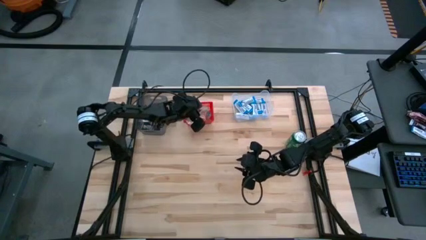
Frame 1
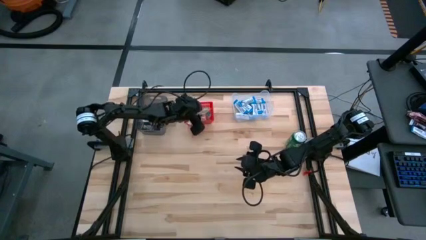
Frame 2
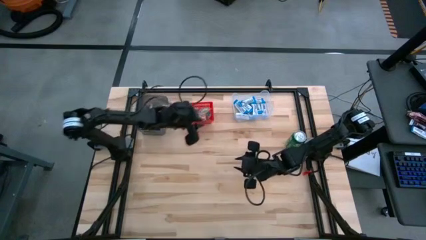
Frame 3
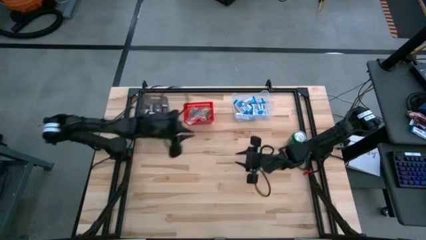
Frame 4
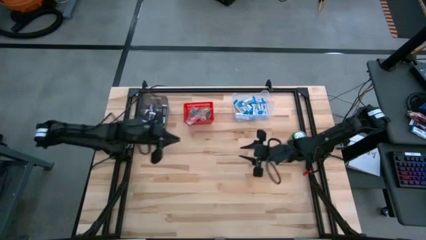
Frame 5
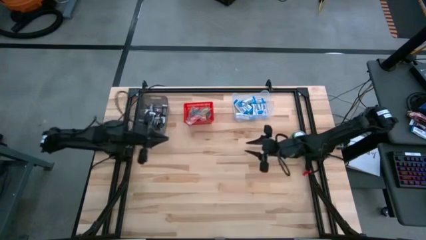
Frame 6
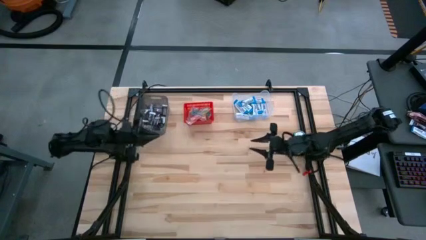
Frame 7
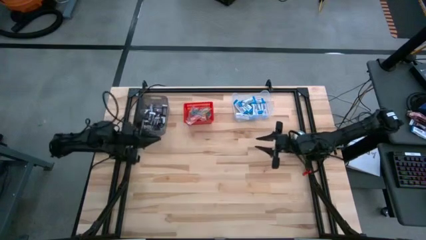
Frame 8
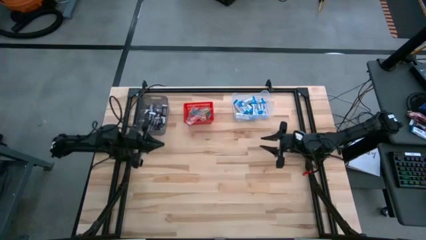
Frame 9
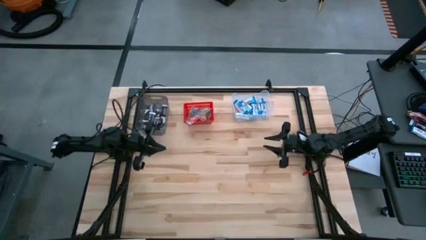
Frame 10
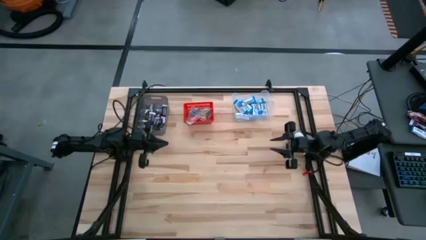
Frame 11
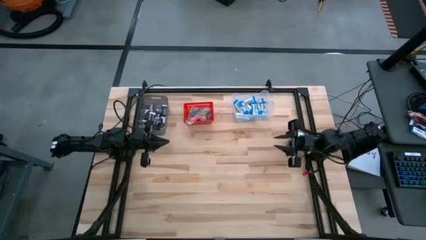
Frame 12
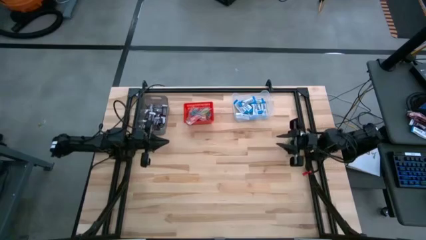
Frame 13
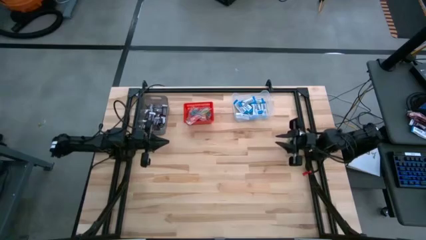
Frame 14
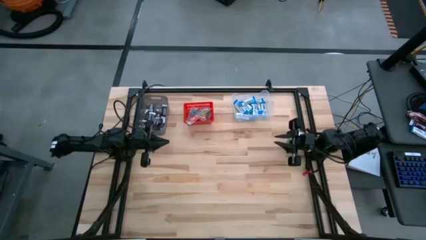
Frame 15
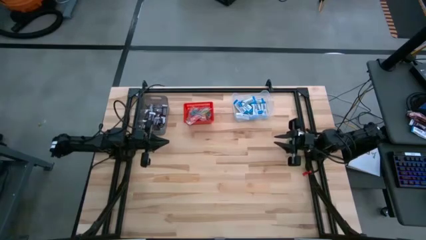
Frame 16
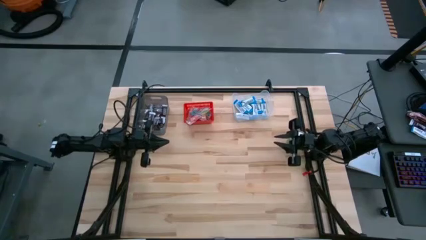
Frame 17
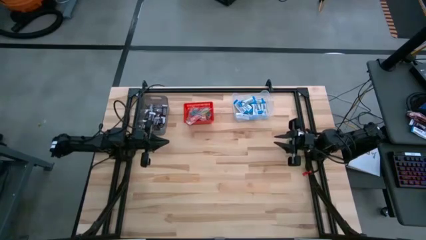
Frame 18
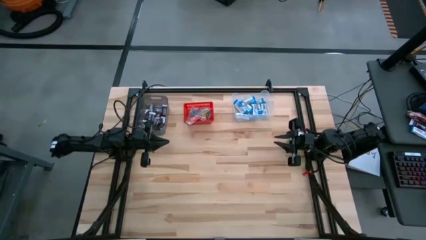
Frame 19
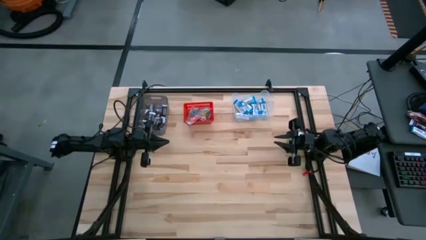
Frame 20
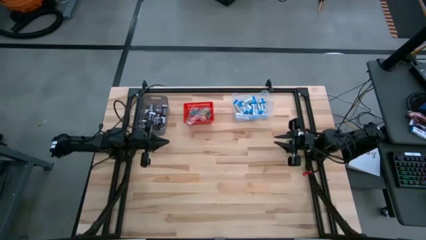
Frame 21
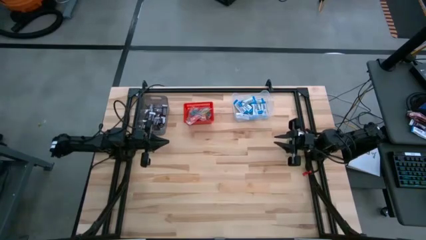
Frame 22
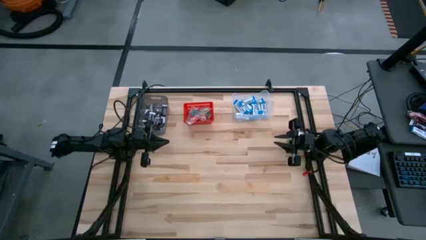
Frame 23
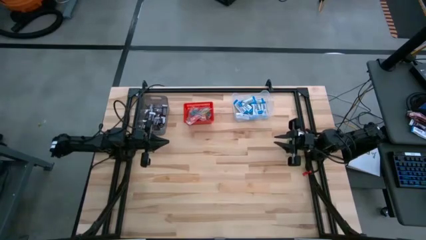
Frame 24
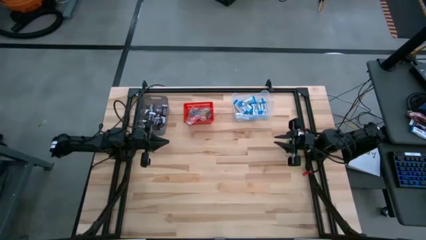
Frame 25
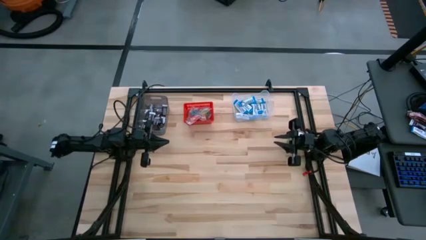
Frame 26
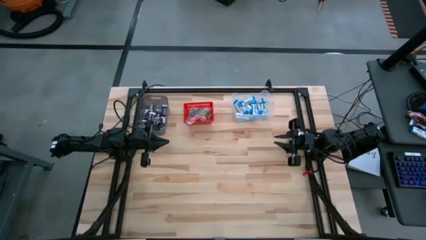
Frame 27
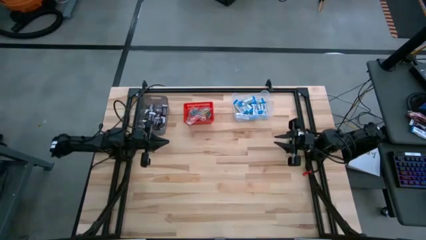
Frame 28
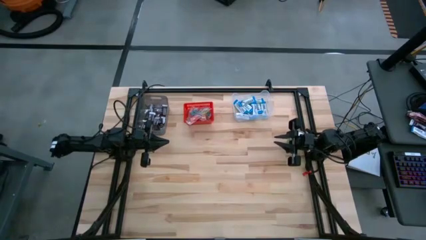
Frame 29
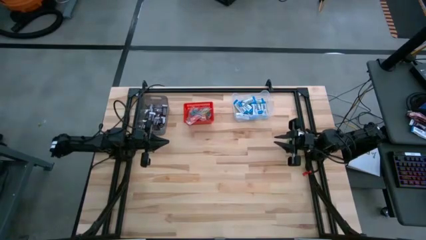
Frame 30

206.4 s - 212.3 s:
Task: Sort candy
Return to Home Position

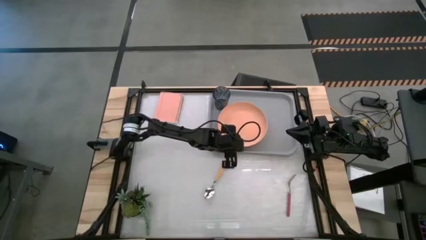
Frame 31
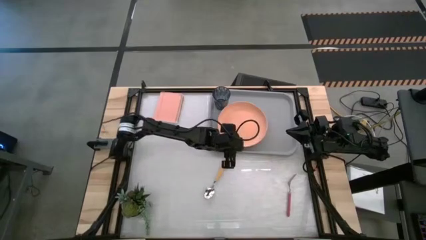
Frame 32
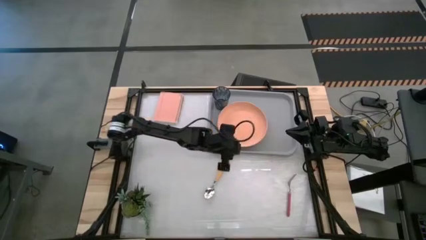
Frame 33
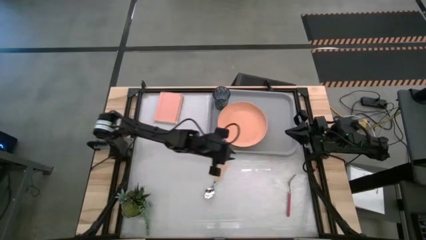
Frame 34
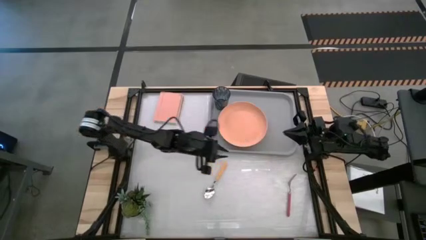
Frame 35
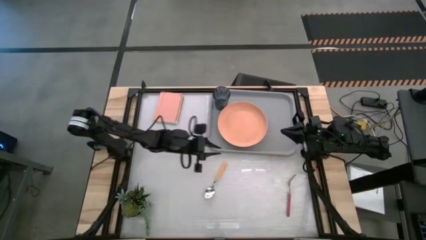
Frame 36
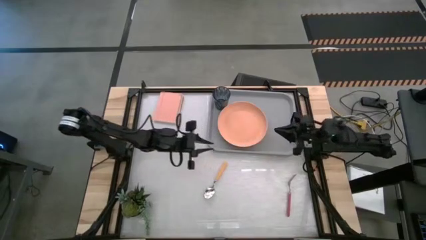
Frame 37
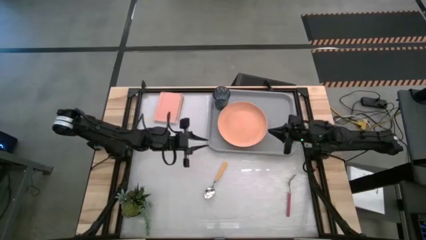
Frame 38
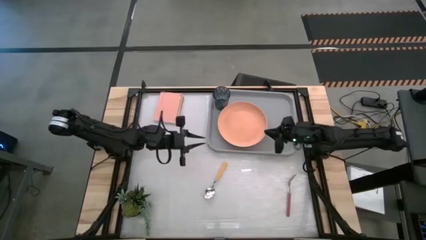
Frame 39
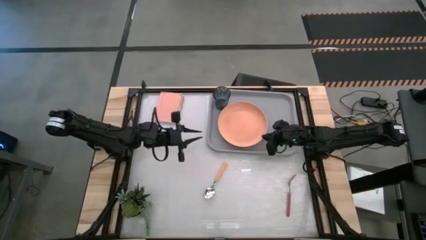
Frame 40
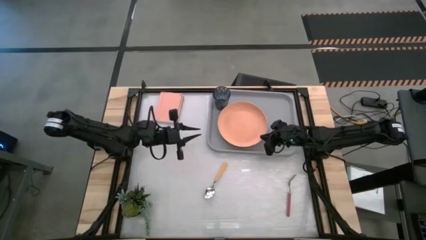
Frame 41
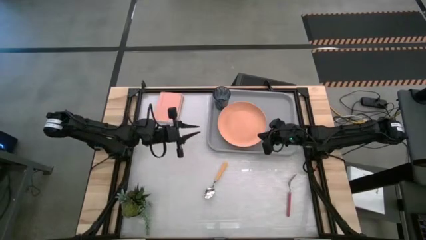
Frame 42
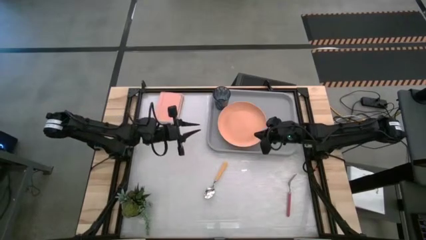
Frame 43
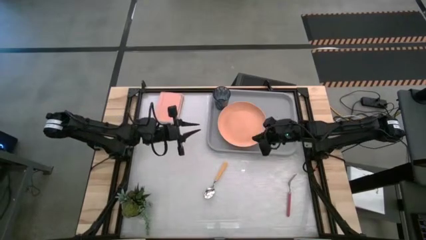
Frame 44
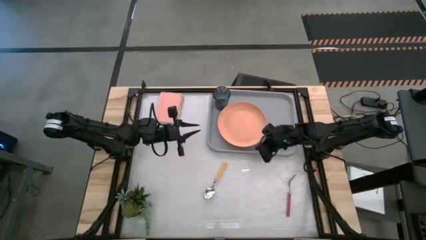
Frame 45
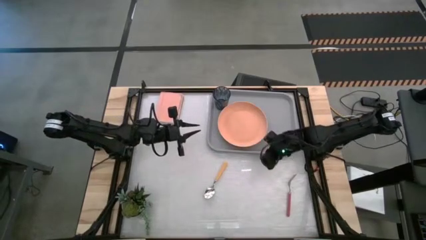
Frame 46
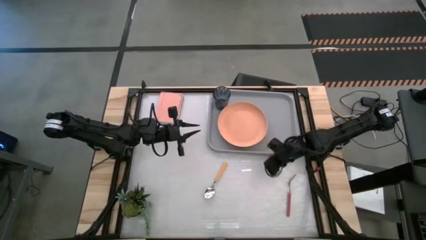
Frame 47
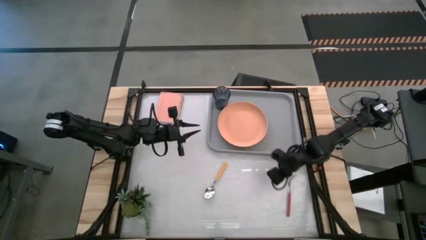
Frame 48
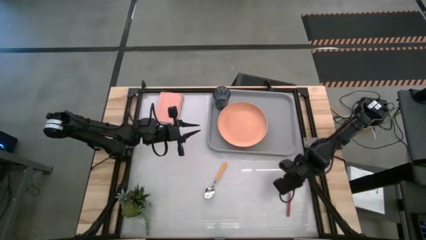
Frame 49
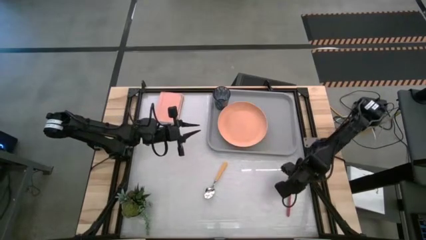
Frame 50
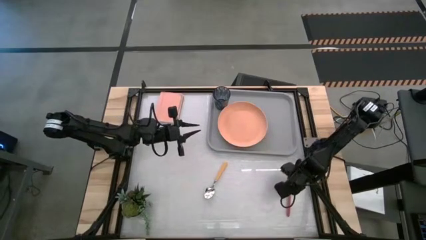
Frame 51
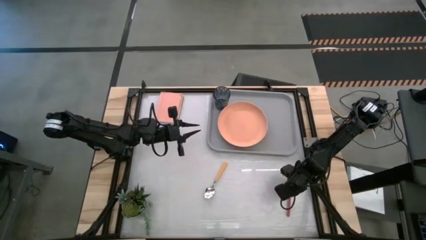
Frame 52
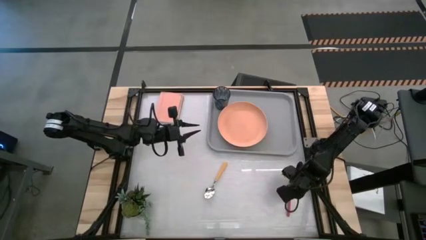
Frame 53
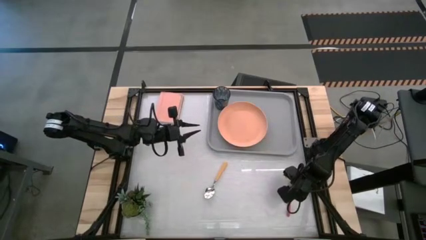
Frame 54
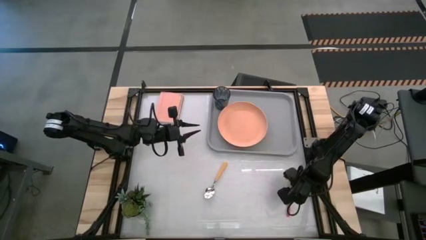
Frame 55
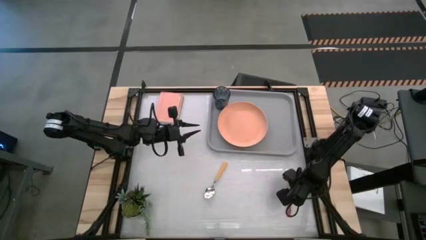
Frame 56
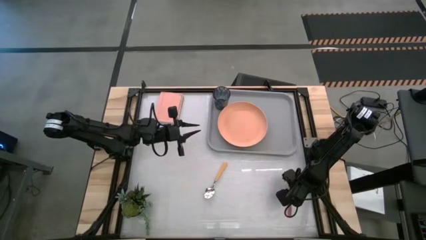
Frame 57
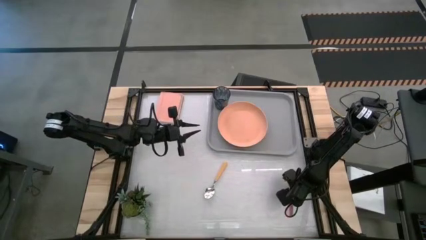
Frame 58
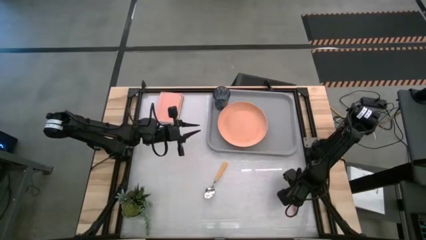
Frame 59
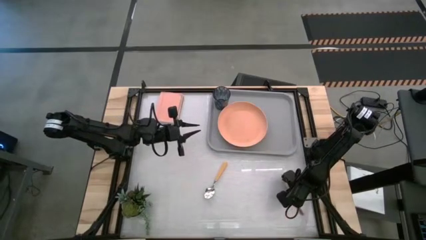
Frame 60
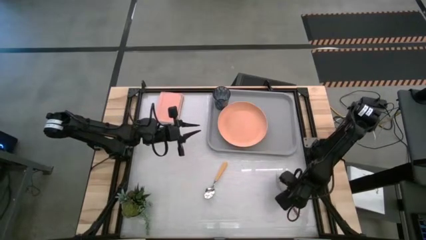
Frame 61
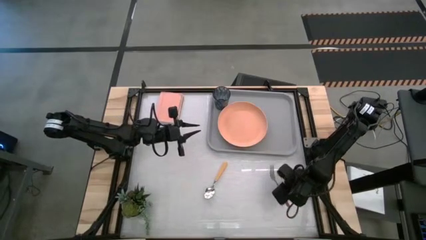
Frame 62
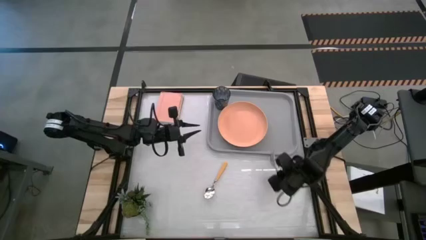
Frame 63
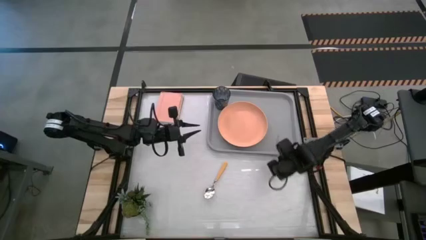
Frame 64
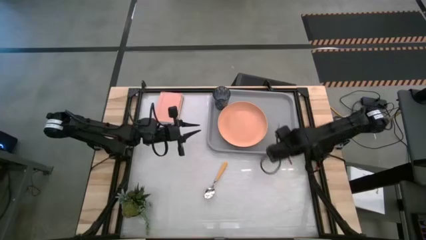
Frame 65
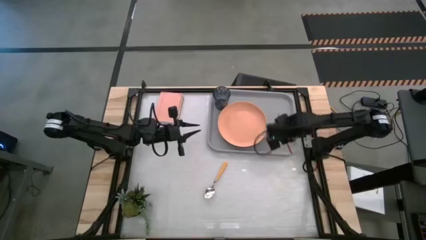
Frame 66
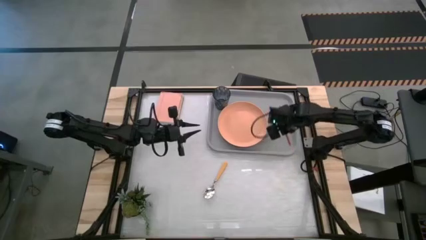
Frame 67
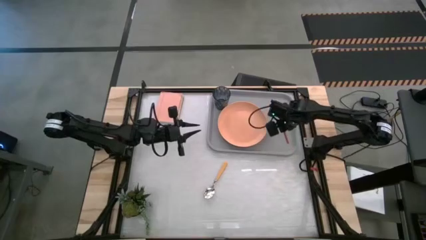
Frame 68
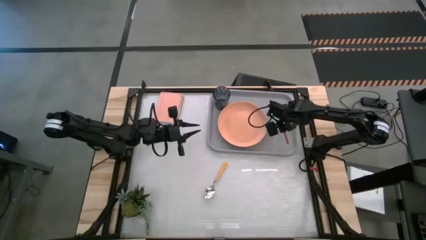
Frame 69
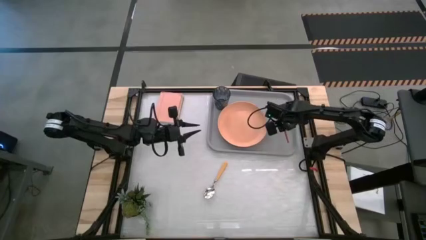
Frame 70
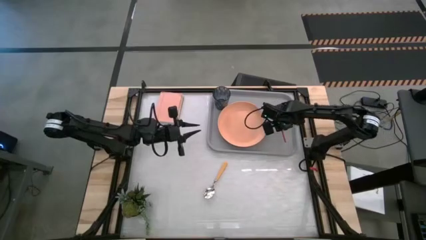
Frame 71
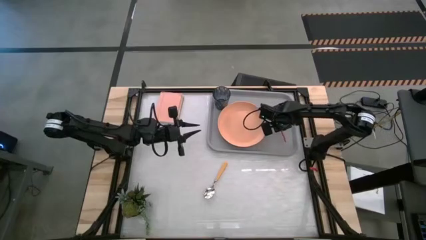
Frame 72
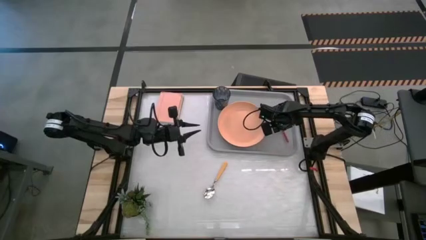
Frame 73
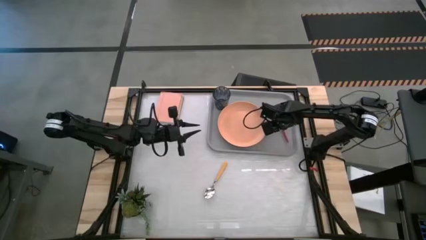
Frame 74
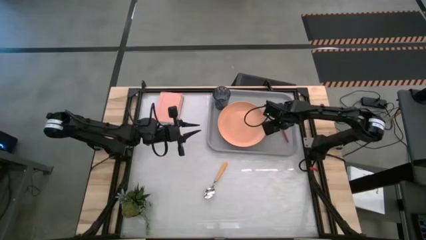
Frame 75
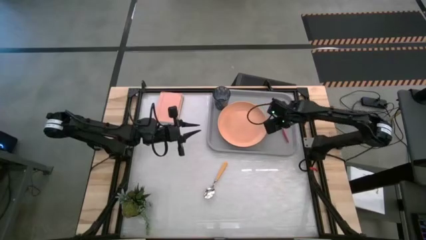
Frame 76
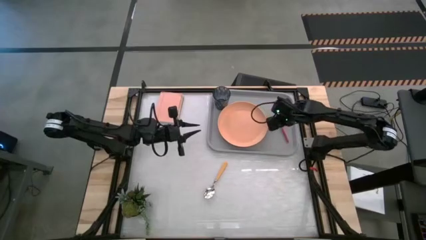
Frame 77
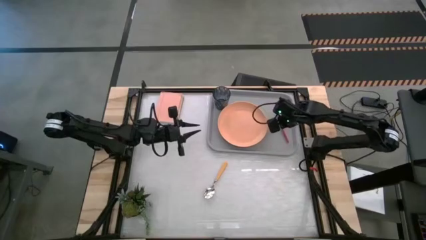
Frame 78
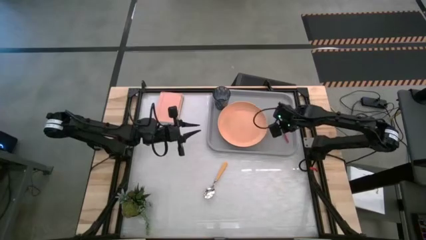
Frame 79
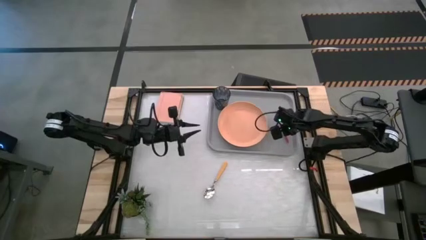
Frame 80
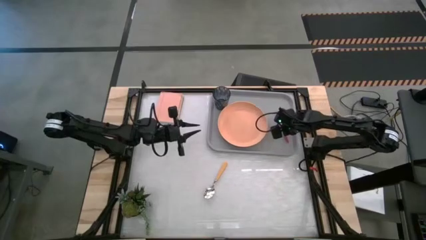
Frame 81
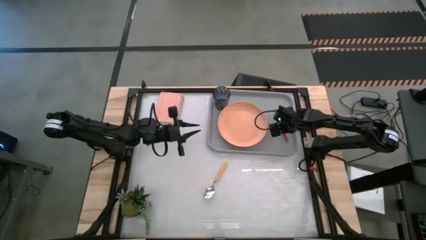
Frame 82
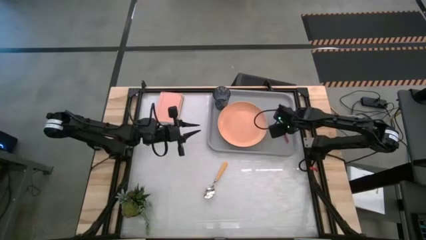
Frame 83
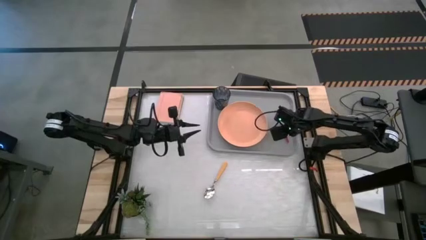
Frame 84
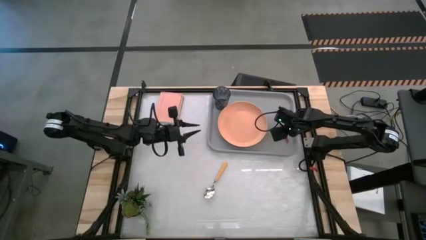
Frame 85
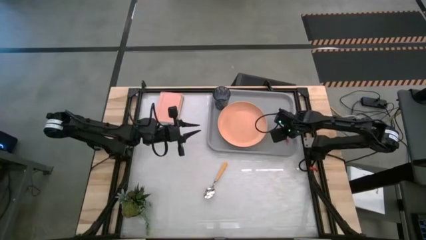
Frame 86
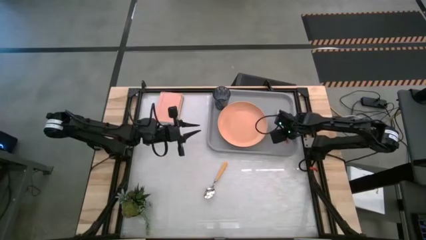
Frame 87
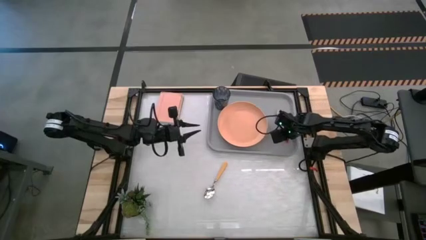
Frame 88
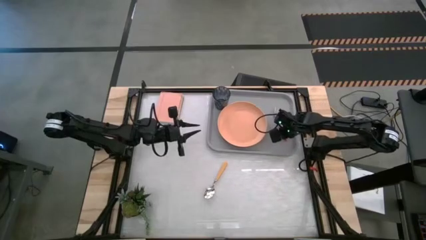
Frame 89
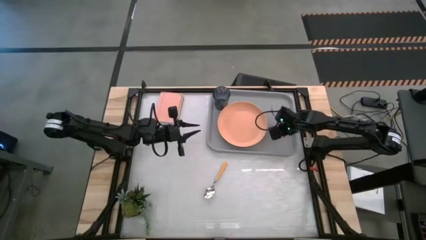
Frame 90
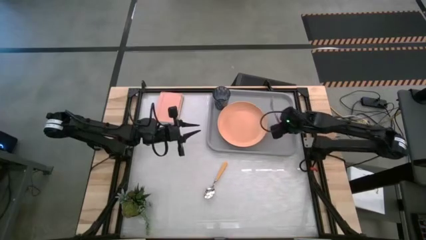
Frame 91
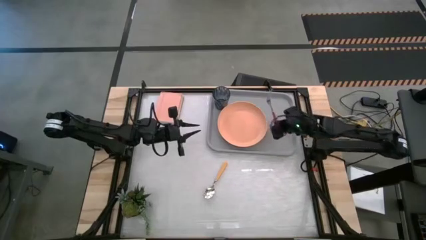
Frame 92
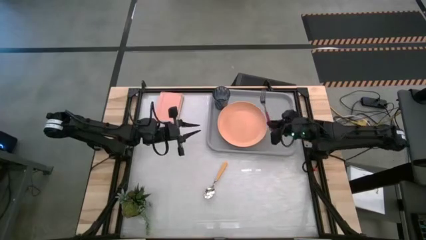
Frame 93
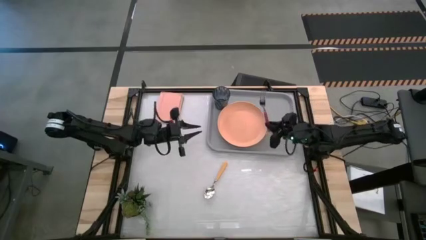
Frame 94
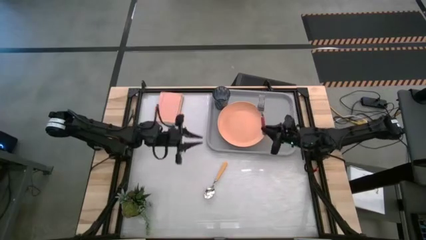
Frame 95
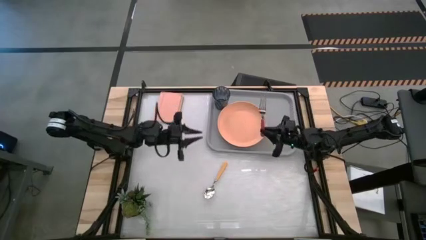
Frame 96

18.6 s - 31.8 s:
Task: Pick and place plate/cup/fork/spoon on tray
Put the red fork on the right of the gray serving tray
